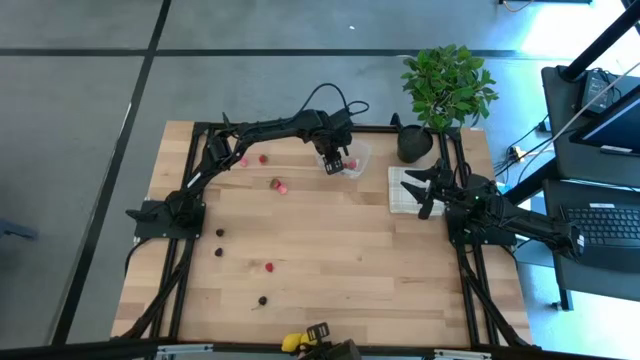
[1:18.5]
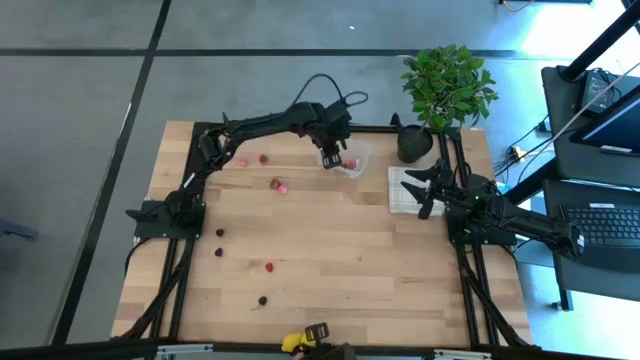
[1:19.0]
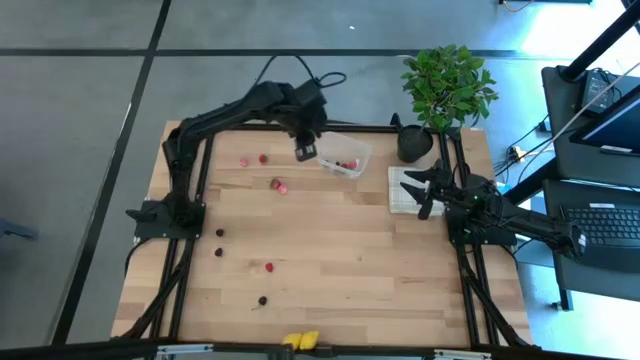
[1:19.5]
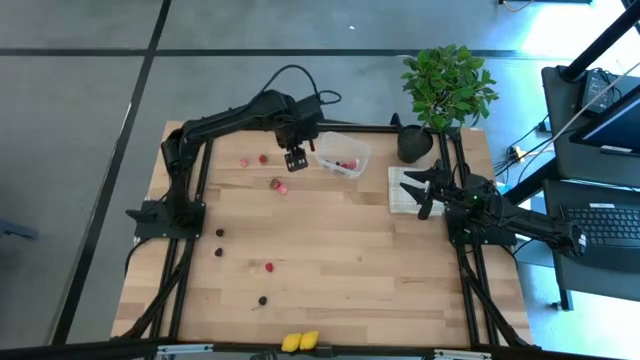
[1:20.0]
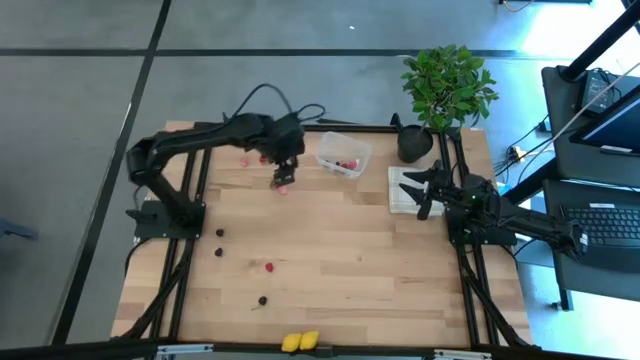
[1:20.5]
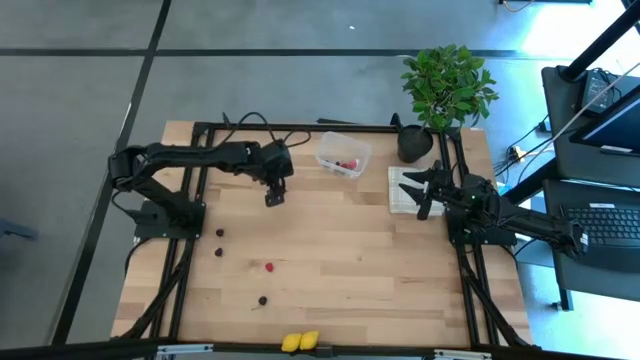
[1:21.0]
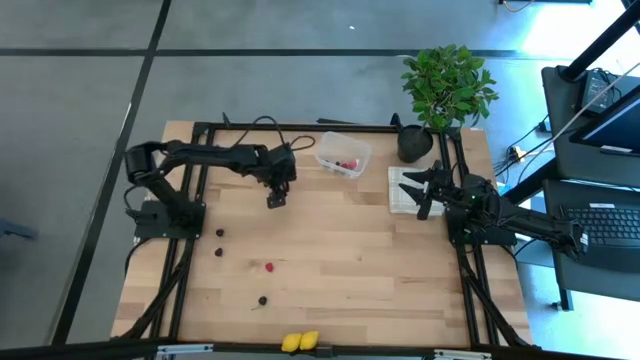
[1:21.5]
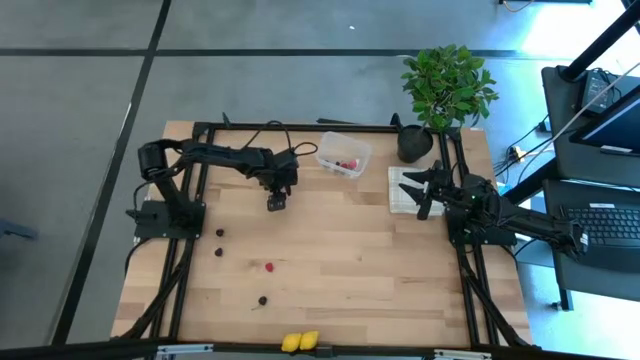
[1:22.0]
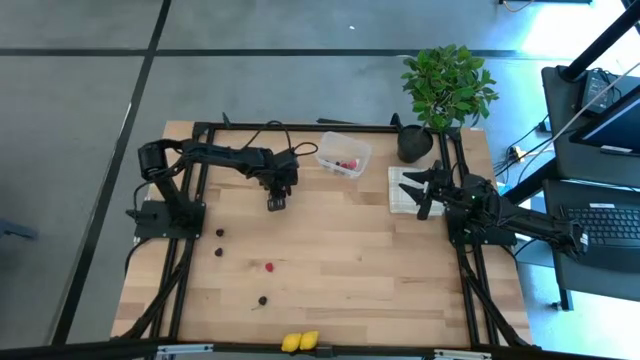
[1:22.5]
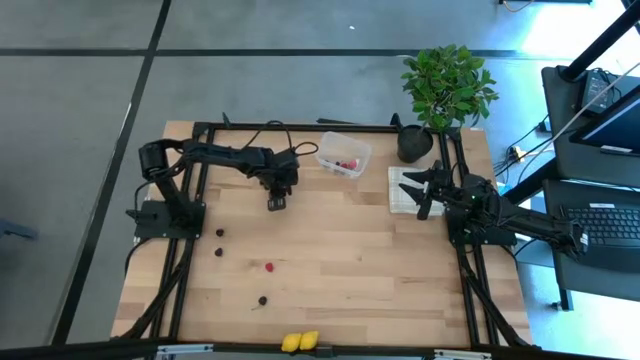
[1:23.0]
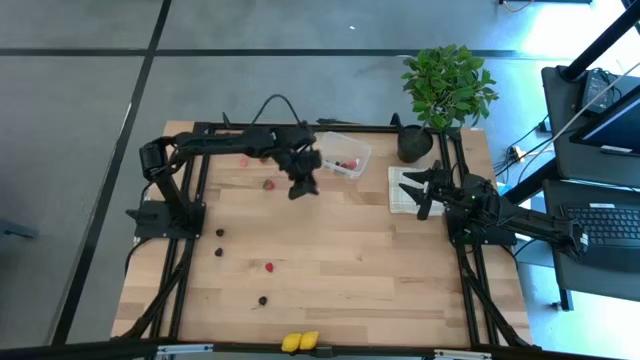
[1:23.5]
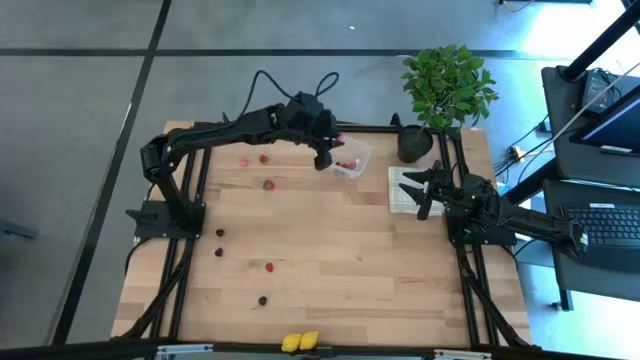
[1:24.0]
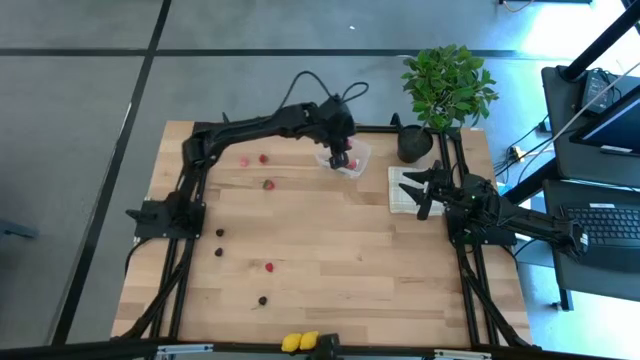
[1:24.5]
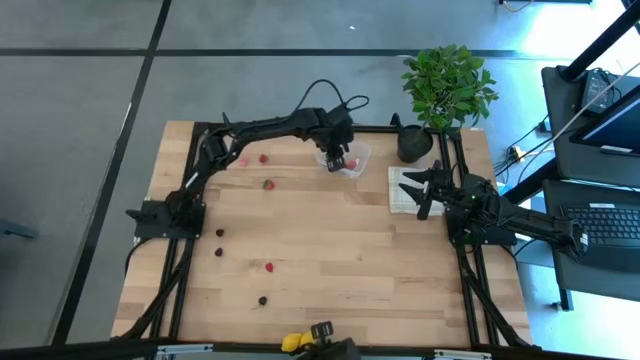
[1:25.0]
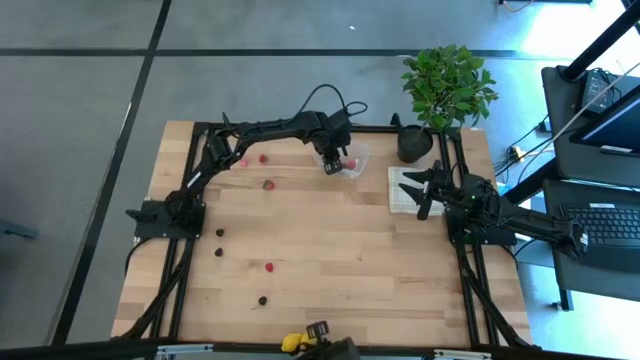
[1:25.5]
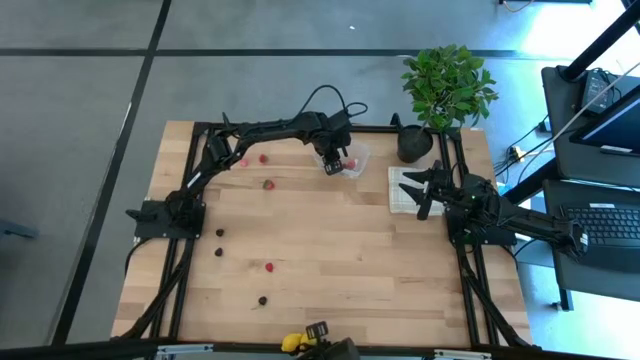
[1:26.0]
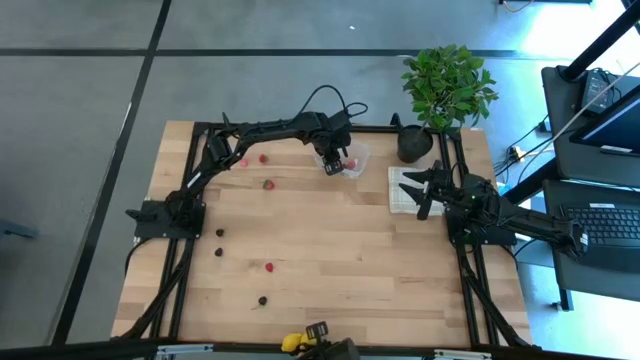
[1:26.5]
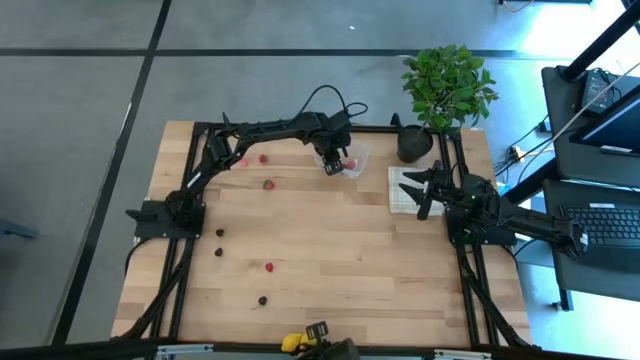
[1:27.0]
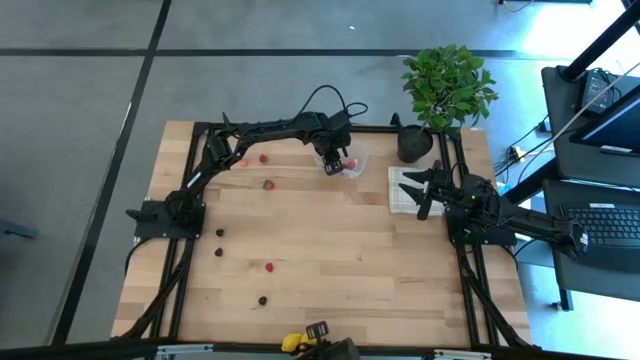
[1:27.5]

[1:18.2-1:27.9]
Task: Pick and placing Produce into tupperware
Put the bottom peach into the transparent container

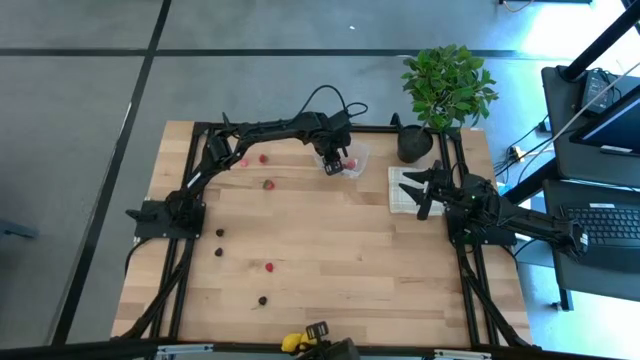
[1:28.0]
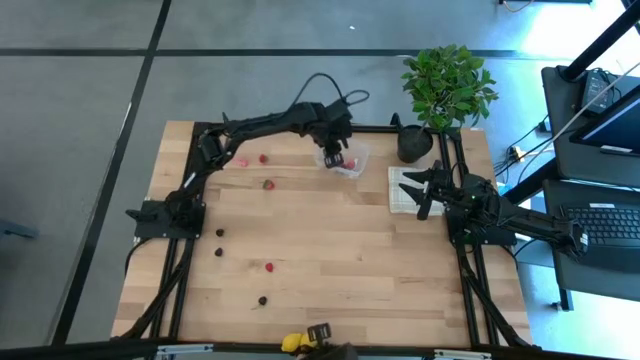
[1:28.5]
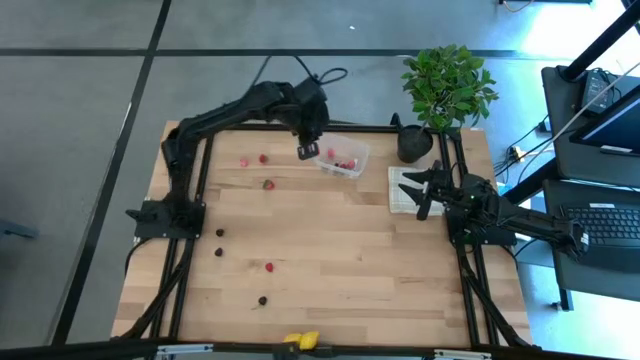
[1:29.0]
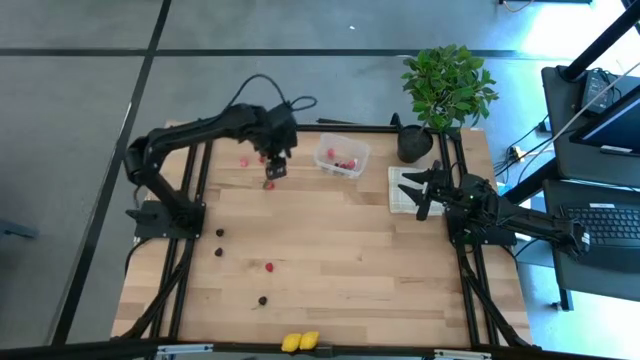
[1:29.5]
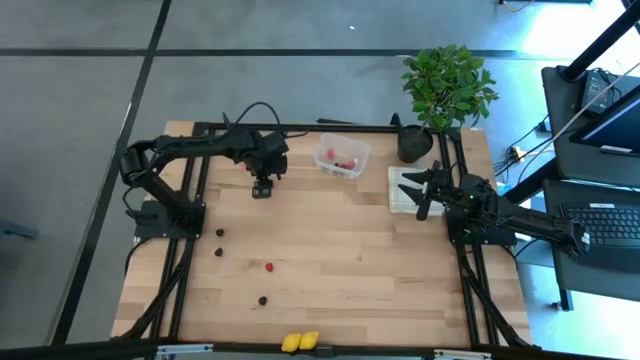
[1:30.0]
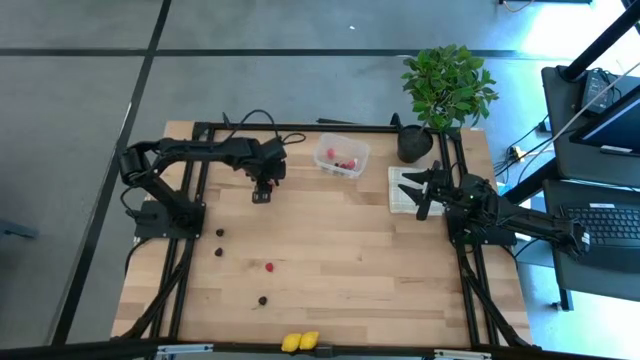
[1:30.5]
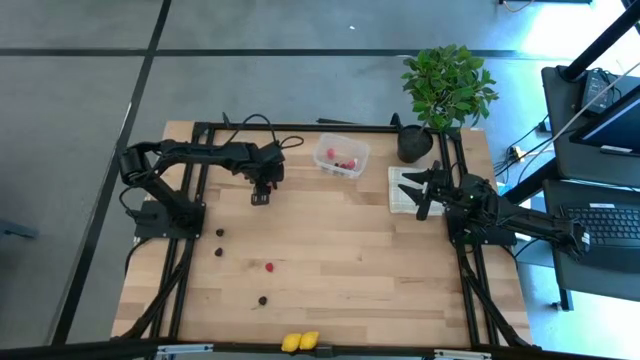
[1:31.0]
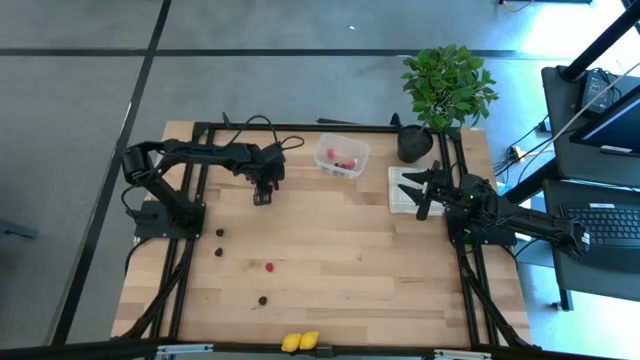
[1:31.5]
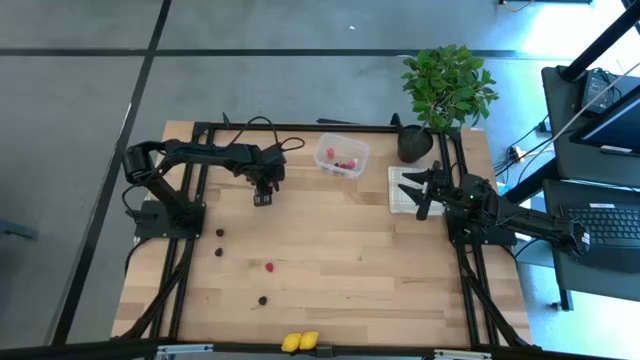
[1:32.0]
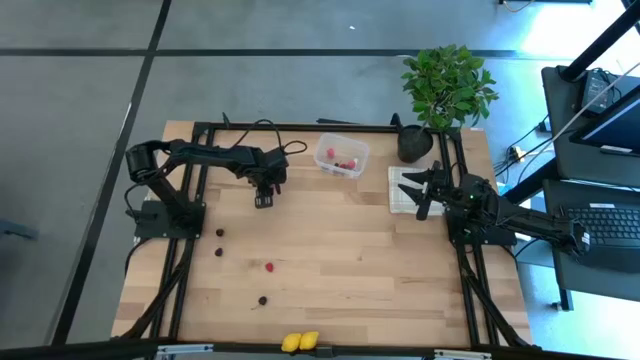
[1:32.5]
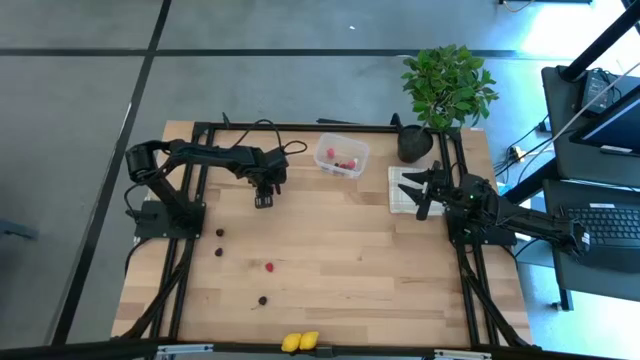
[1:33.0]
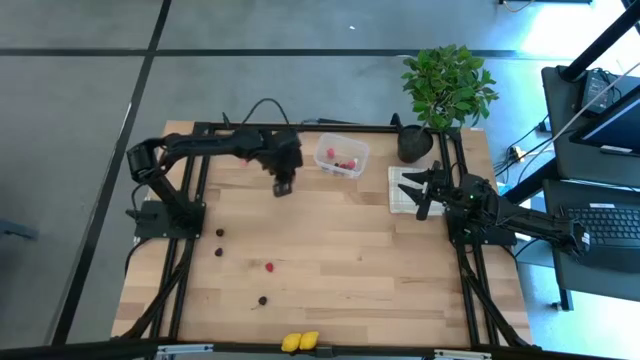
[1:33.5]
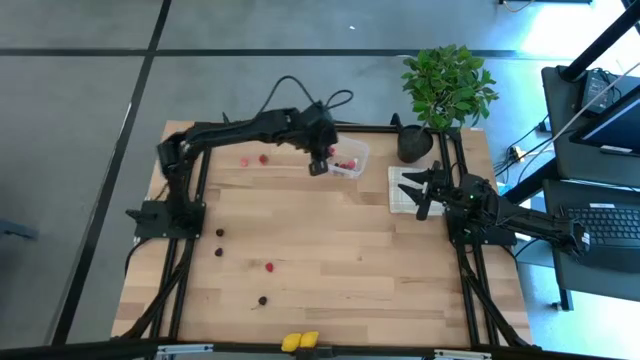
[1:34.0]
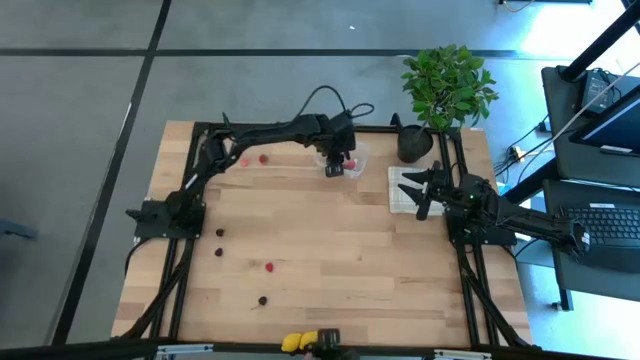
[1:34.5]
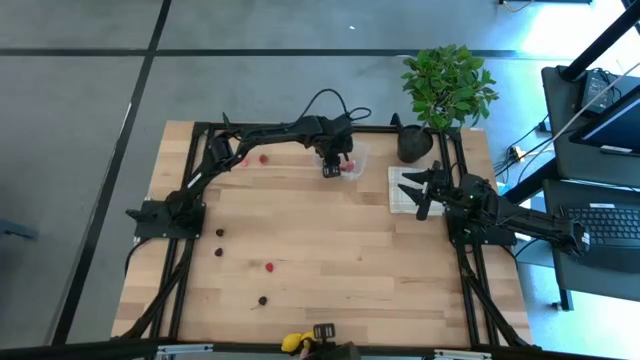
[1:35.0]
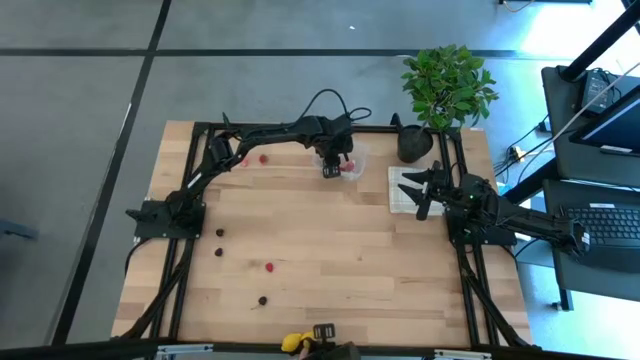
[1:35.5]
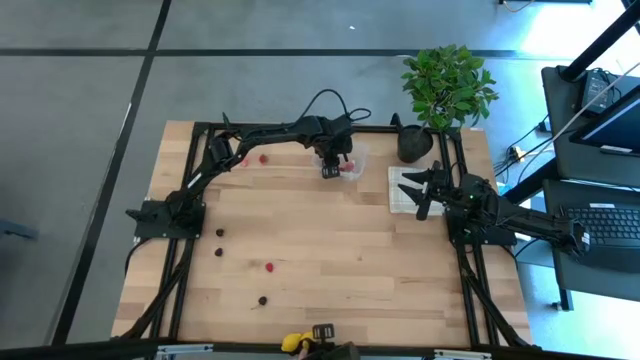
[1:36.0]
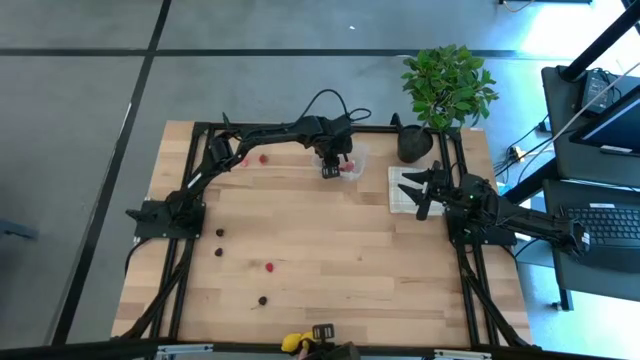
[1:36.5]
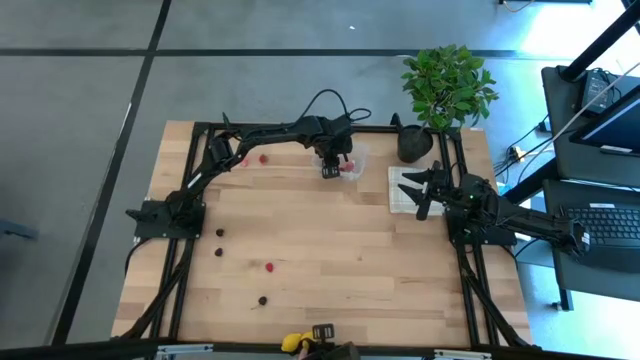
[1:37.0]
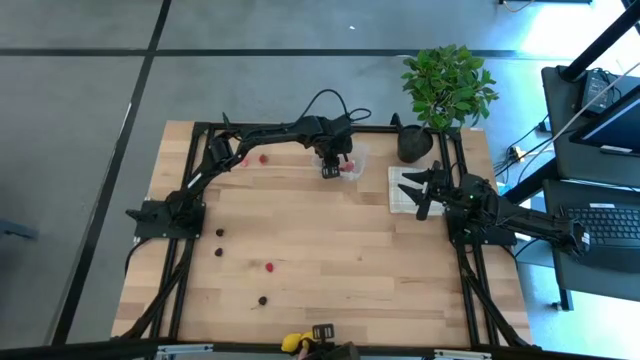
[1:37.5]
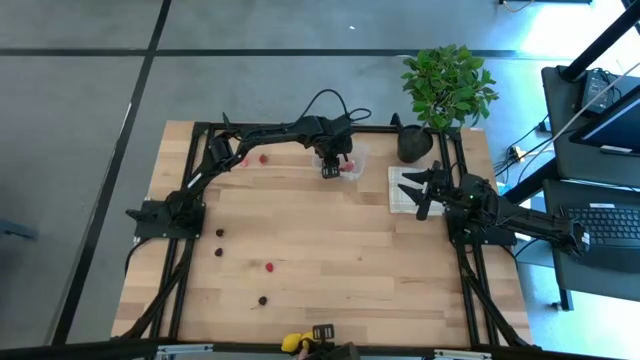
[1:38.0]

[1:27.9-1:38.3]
Put the bottom strawberry into the transparent container

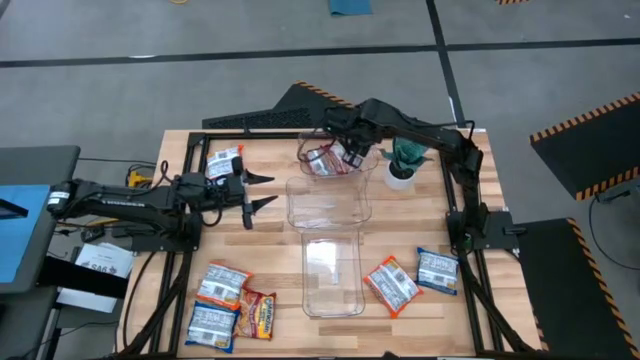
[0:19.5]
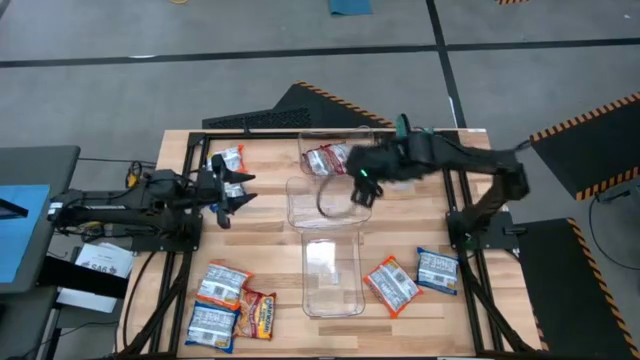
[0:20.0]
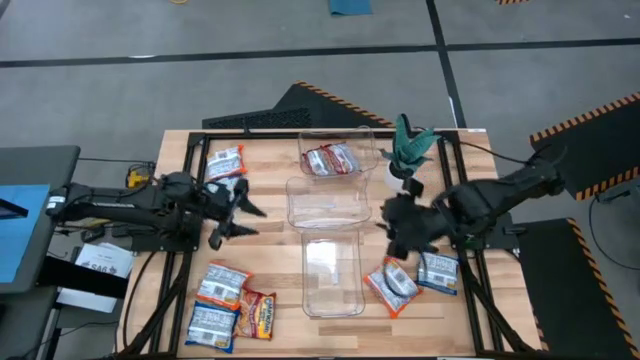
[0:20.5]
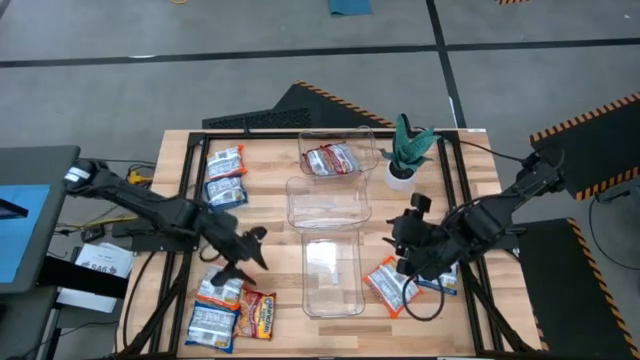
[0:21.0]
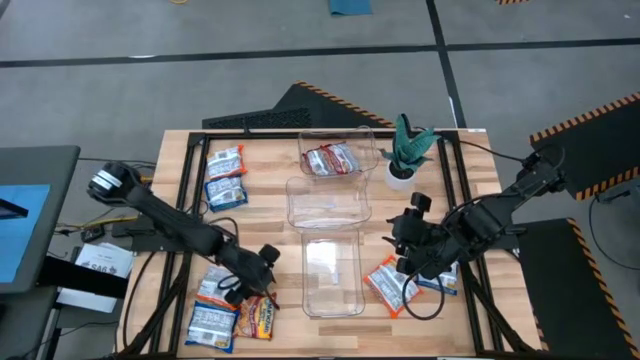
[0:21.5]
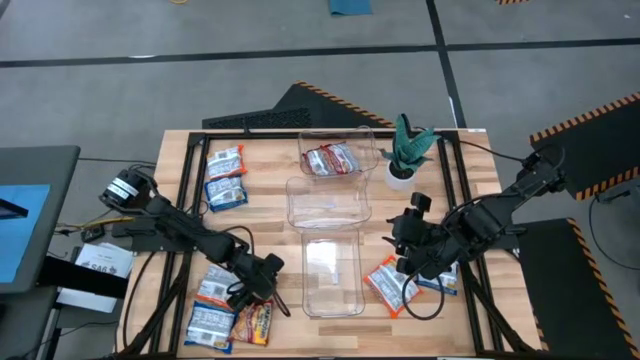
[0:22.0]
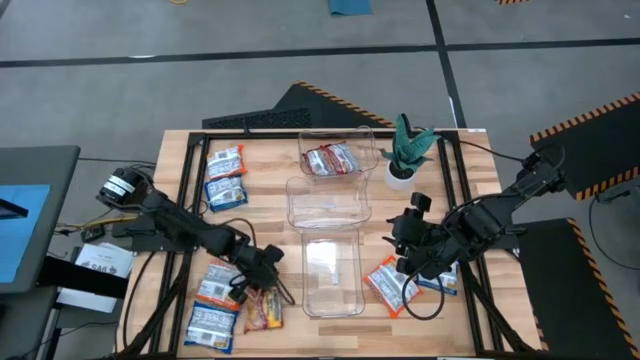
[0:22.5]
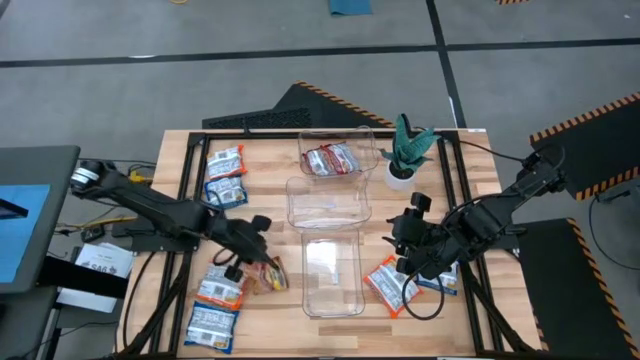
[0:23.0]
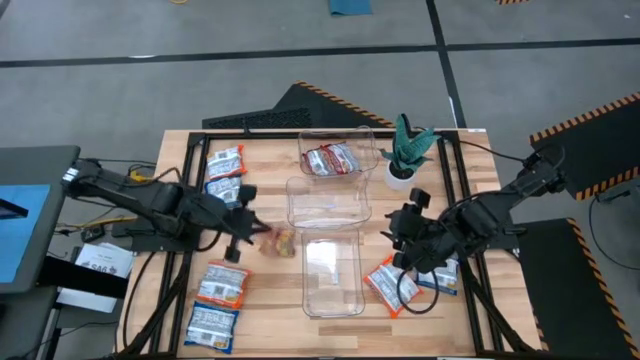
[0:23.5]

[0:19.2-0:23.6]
Task: Sort Maruchan noodles
Put the red noodle pack into the top transparent bin
